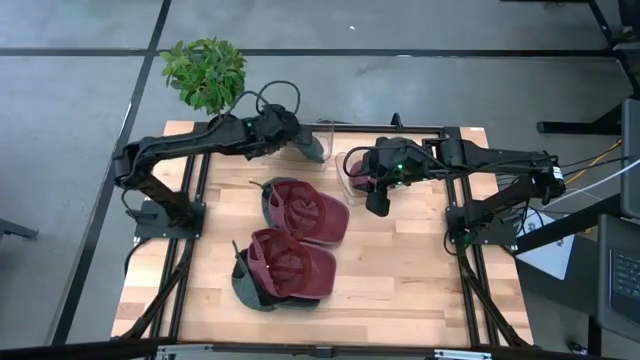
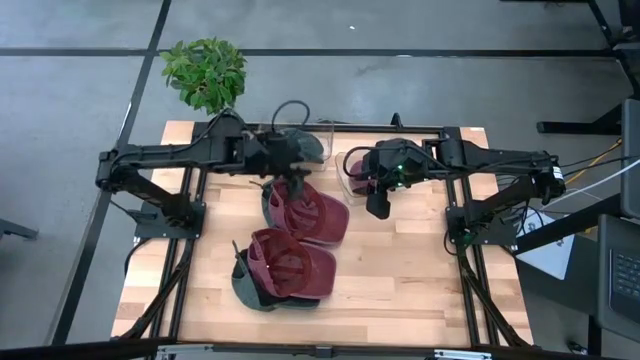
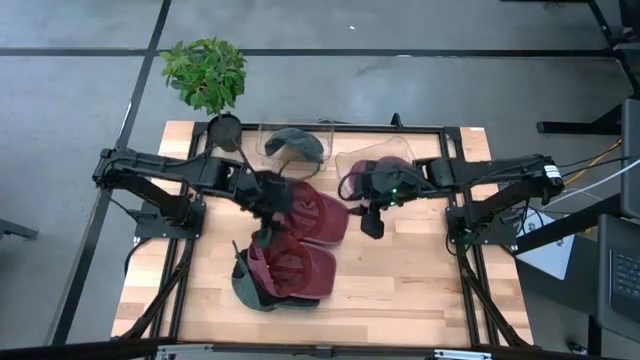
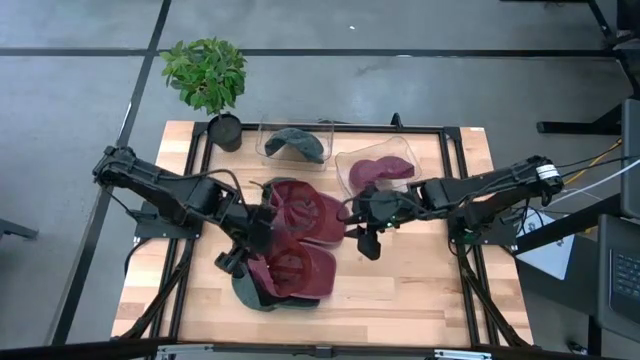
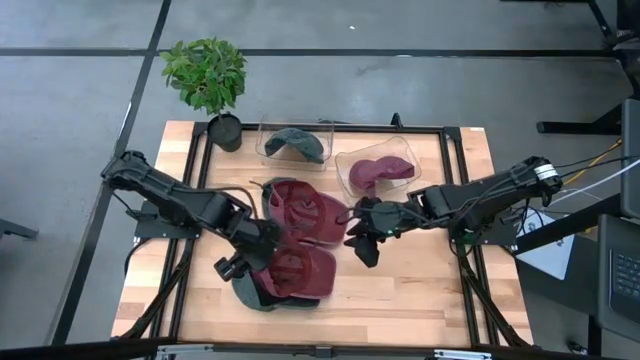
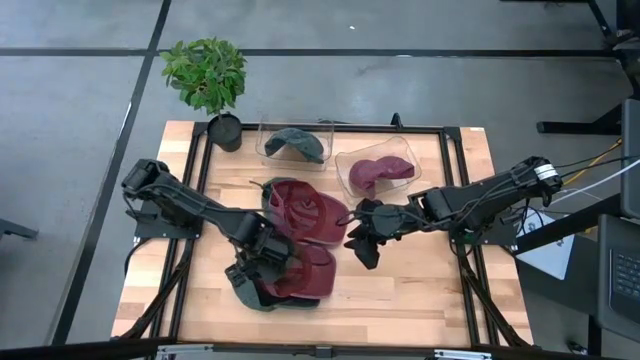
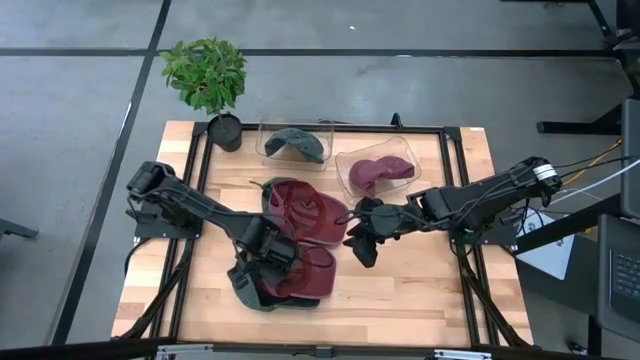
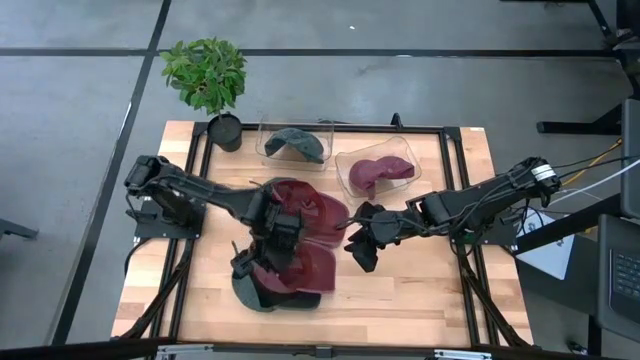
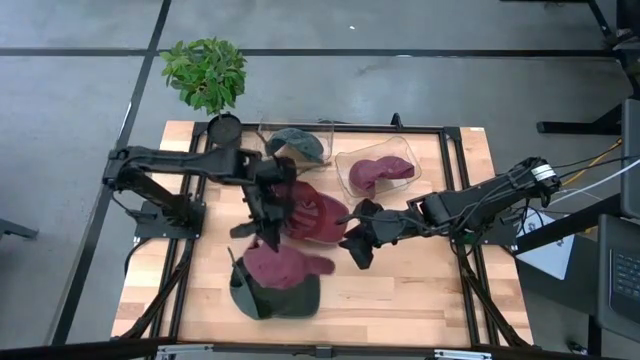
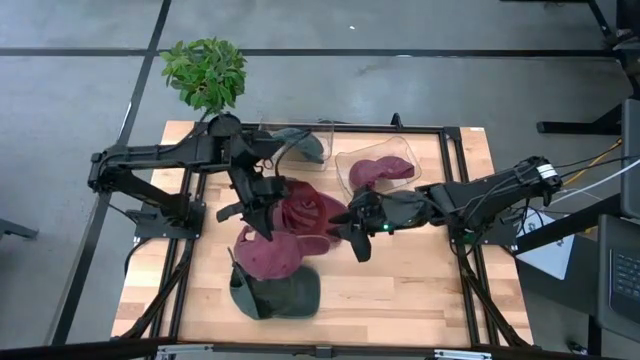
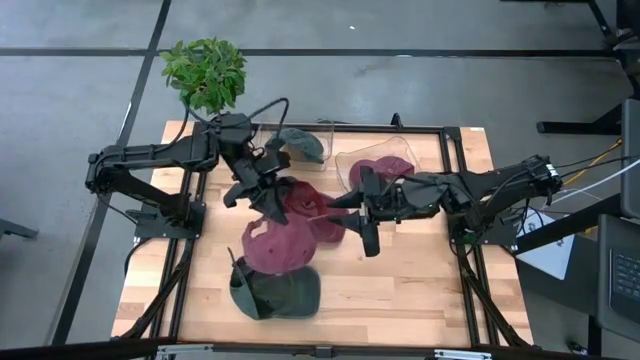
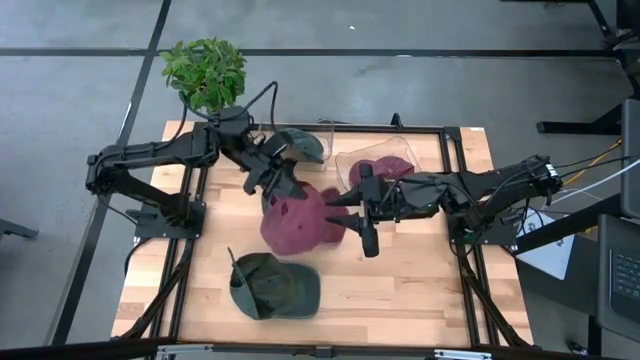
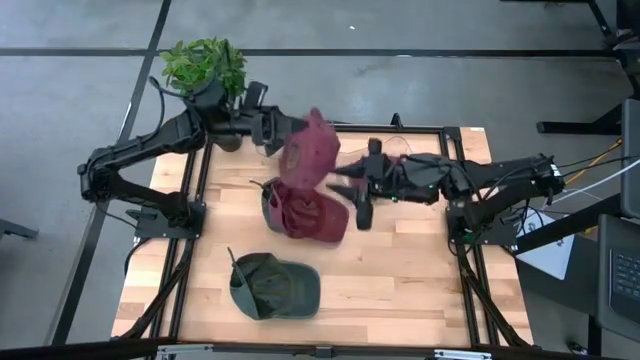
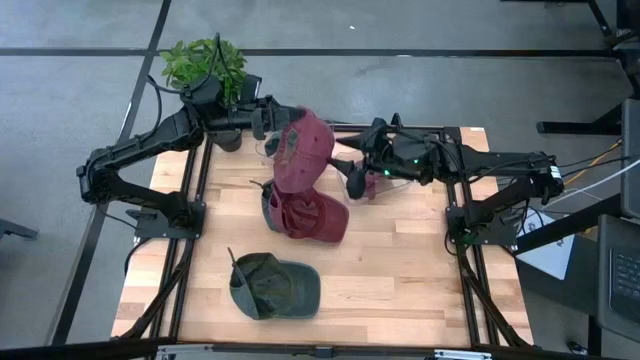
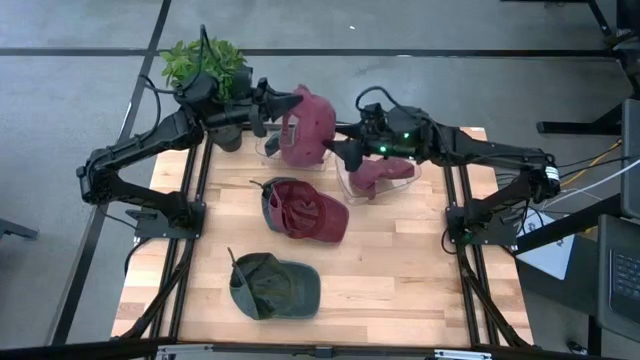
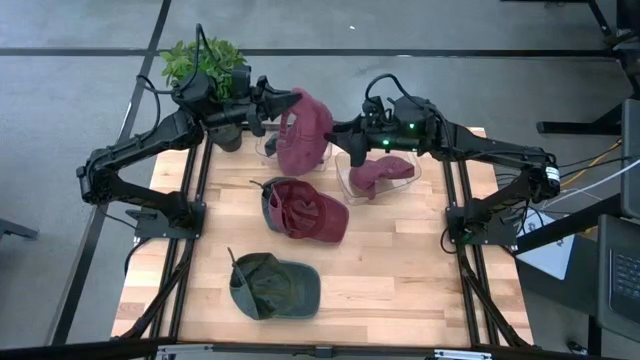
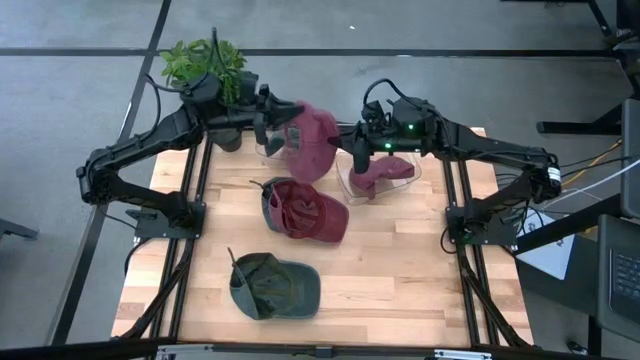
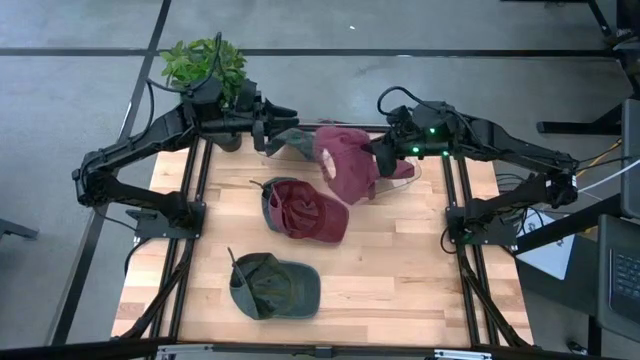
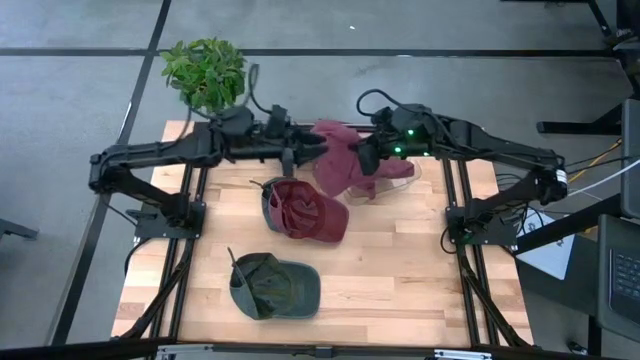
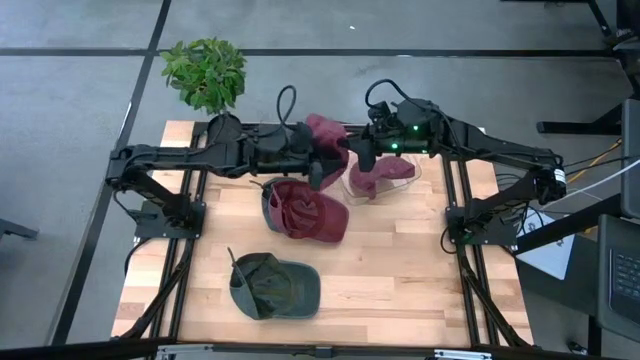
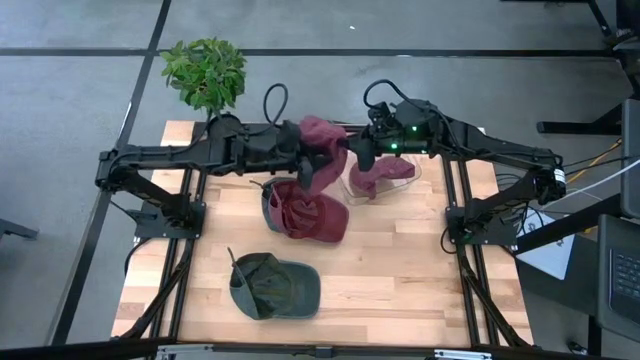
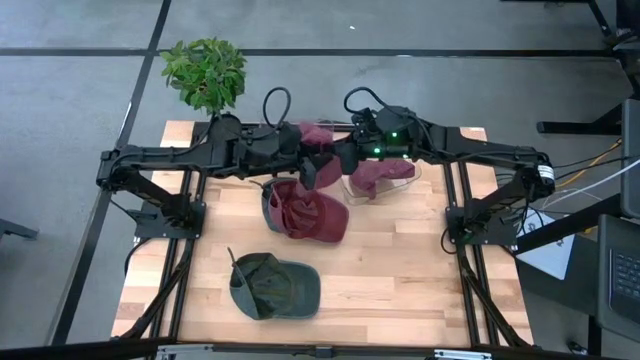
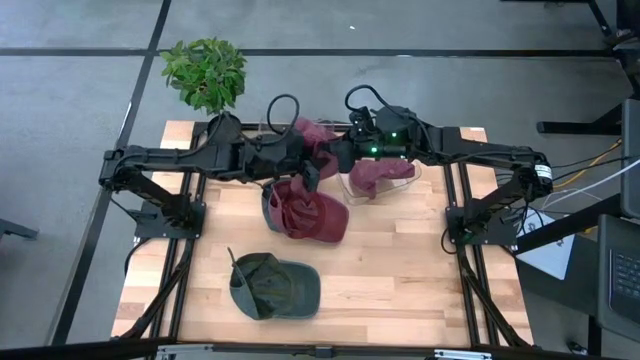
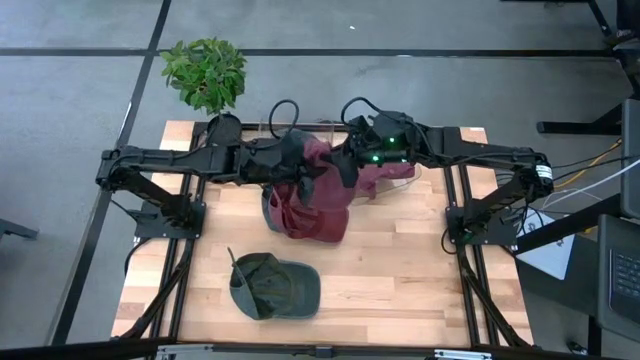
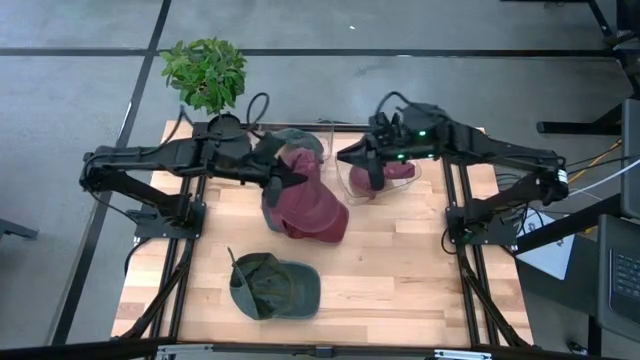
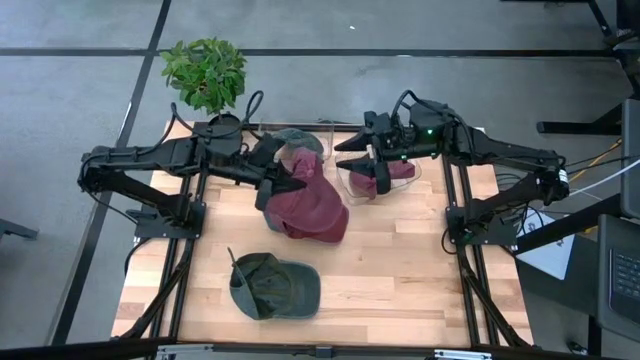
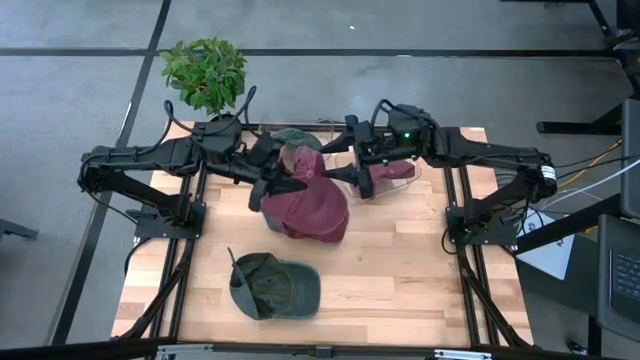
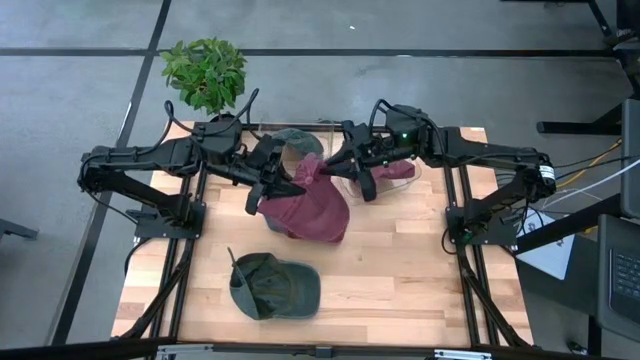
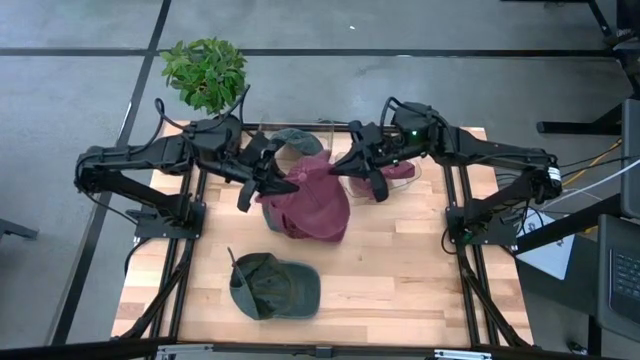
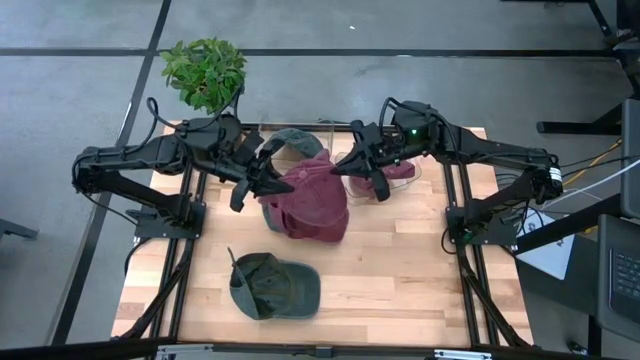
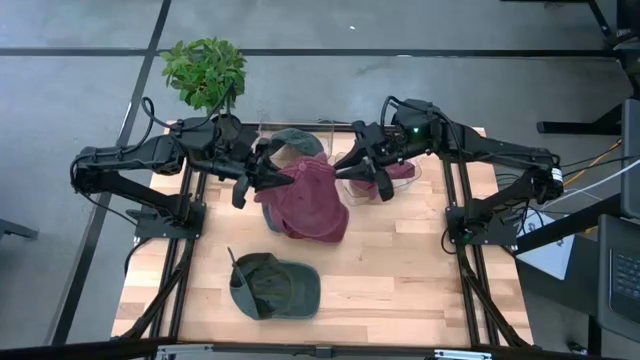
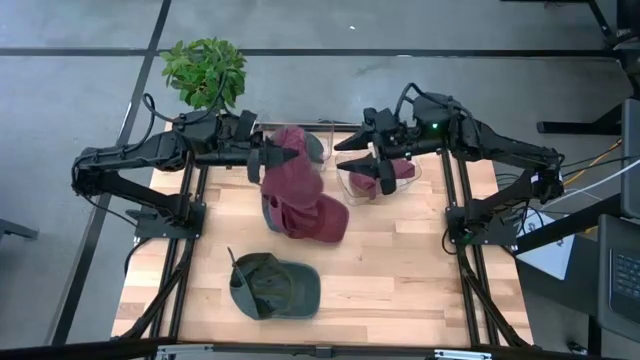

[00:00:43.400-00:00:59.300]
Task: Pick & Place hat
Put the bottom red cap into the right transparent bin

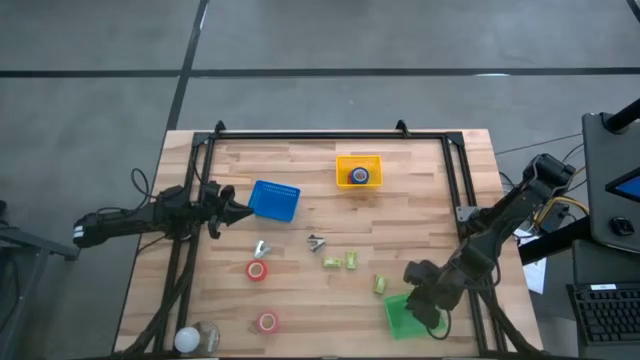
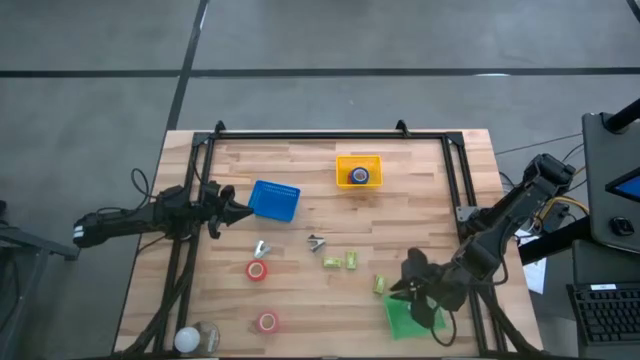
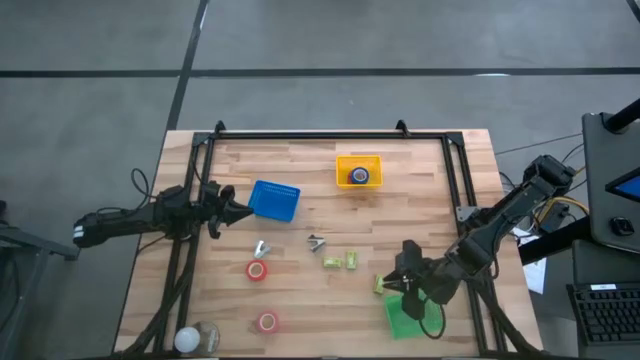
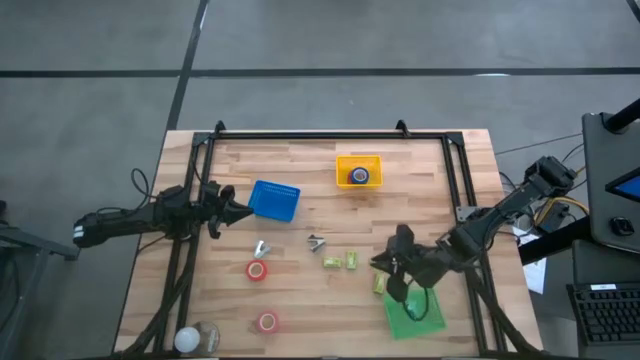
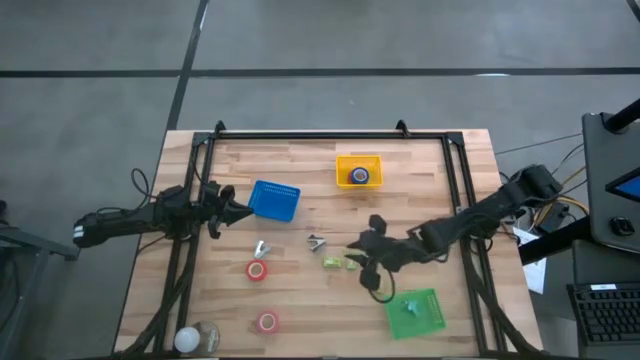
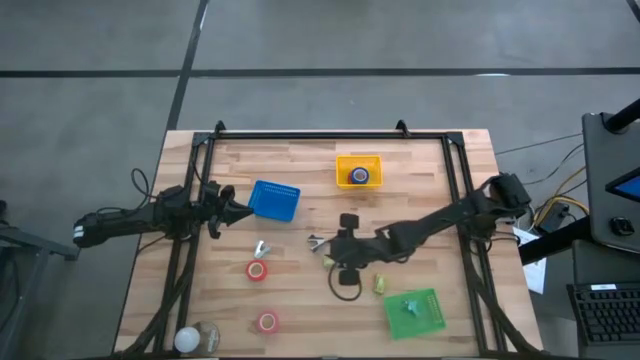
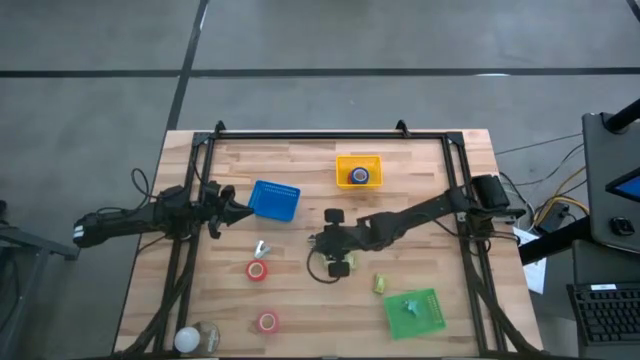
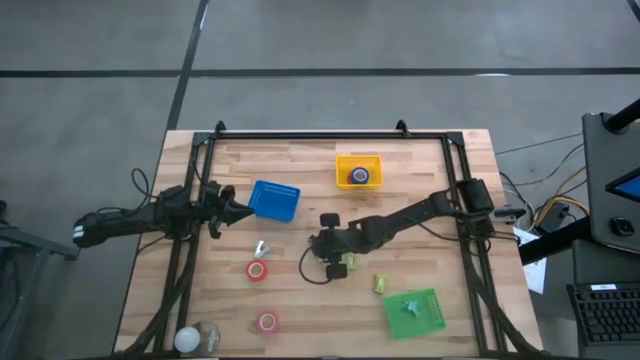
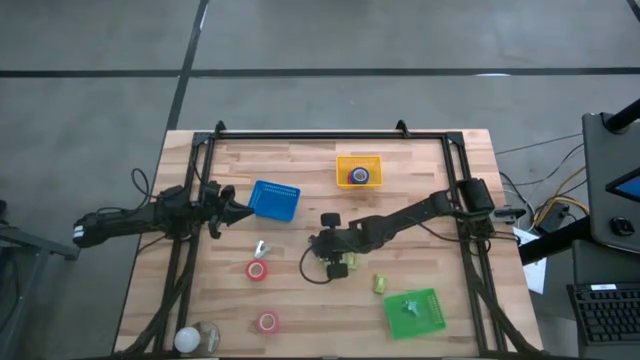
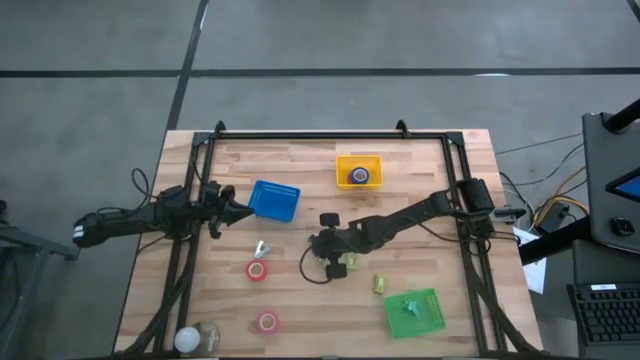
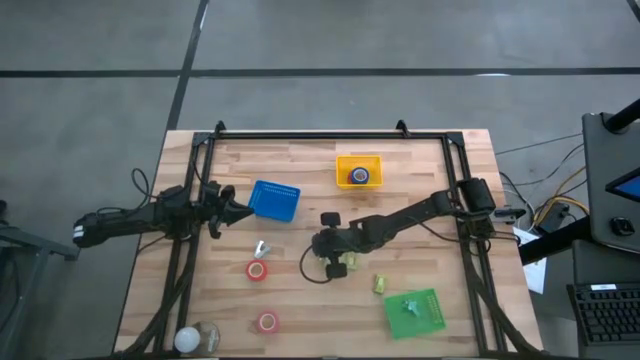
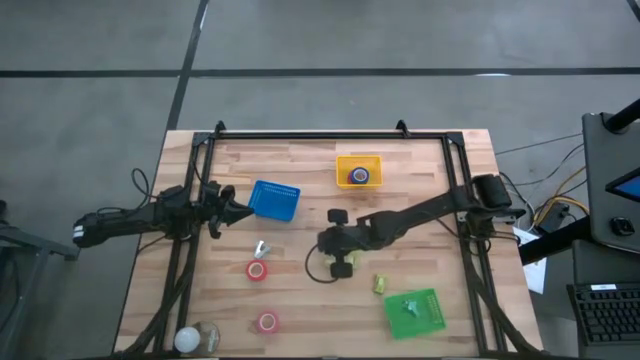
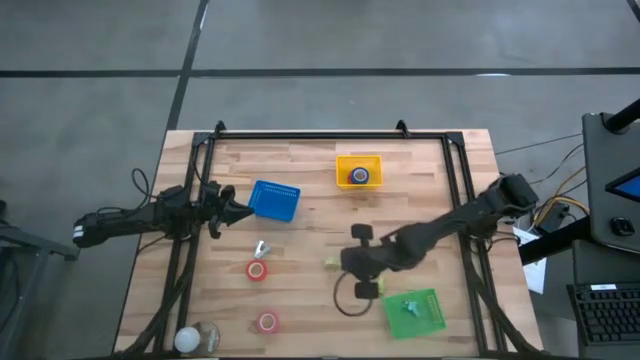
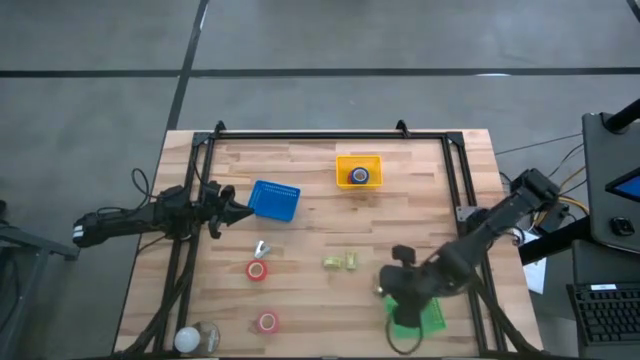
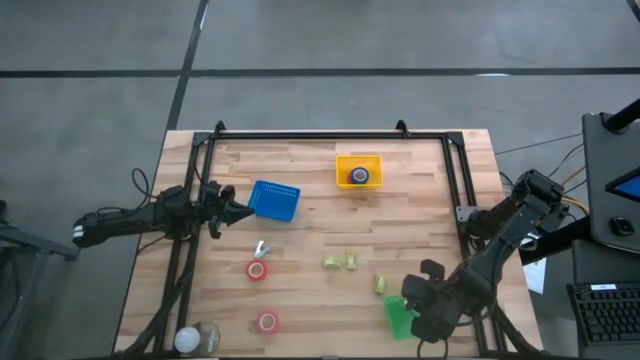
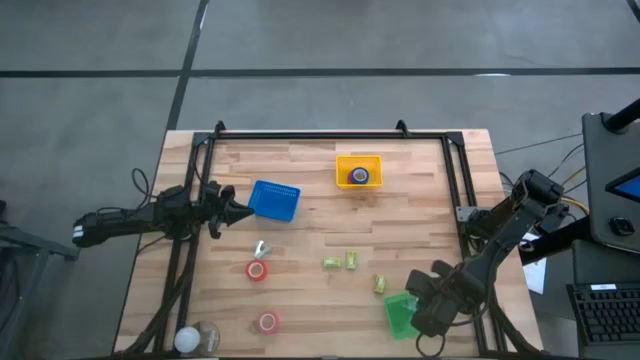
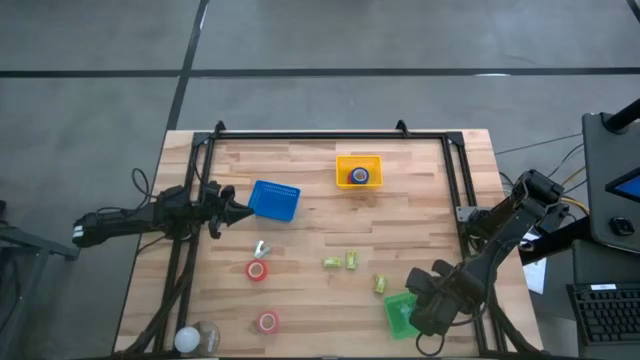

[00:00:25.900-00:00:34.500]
Task: Pick and place Stapler, Stapler remover, tape
Put the black staple remover into the green bin
